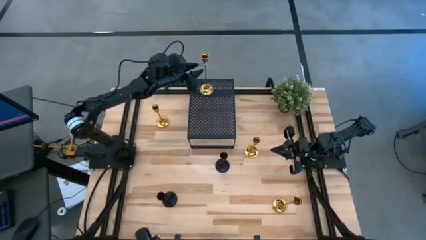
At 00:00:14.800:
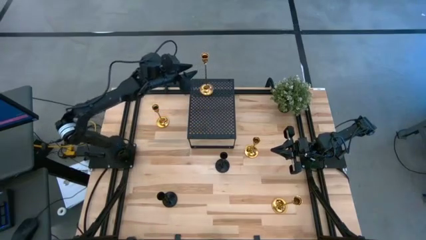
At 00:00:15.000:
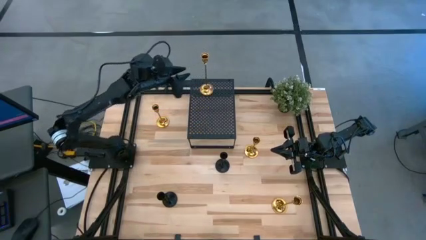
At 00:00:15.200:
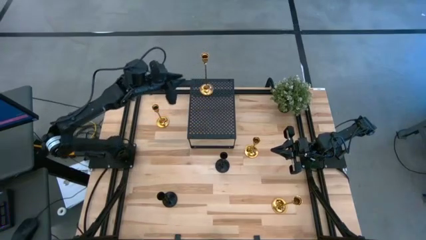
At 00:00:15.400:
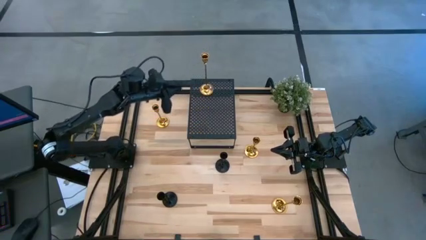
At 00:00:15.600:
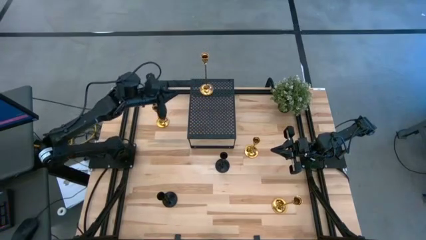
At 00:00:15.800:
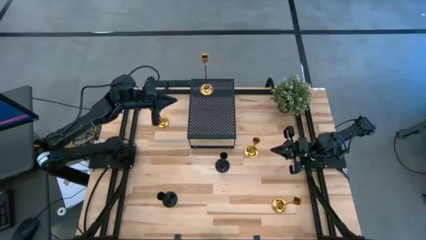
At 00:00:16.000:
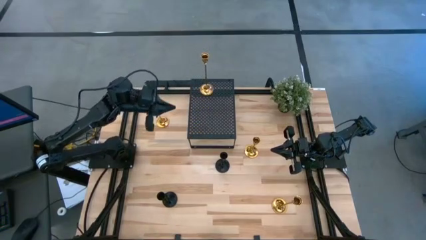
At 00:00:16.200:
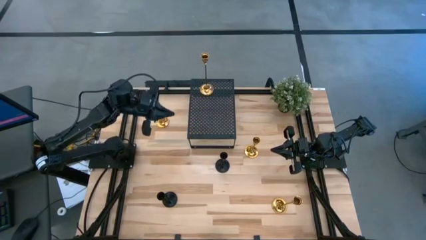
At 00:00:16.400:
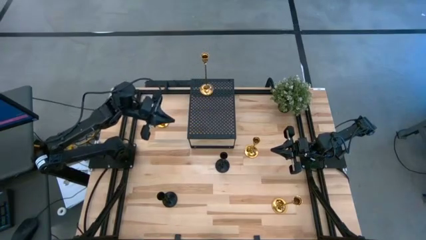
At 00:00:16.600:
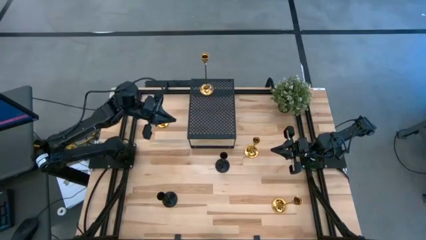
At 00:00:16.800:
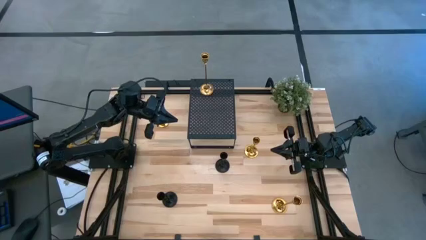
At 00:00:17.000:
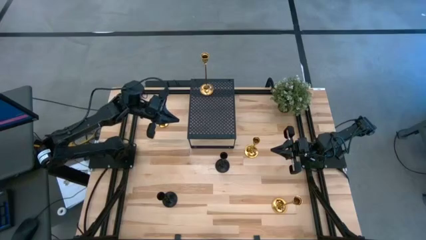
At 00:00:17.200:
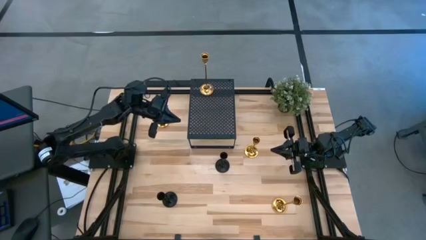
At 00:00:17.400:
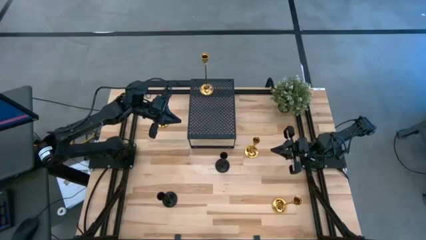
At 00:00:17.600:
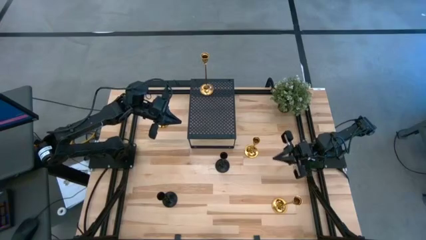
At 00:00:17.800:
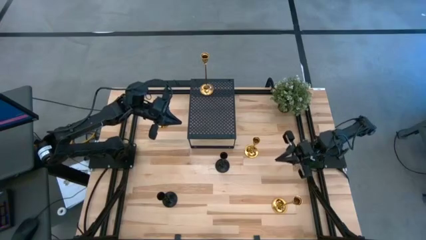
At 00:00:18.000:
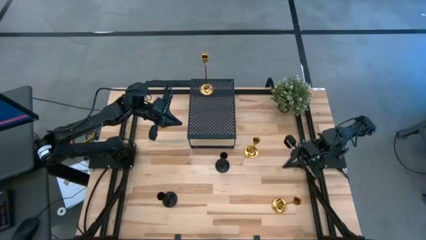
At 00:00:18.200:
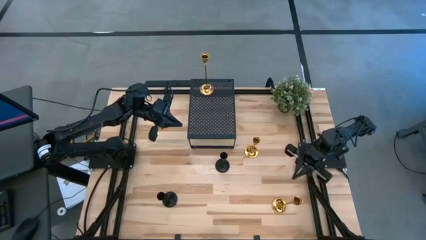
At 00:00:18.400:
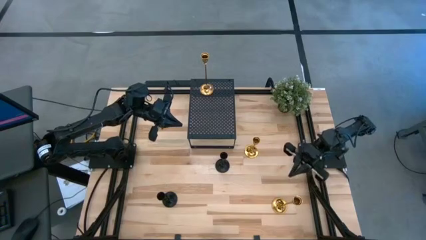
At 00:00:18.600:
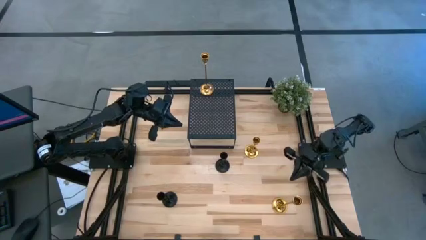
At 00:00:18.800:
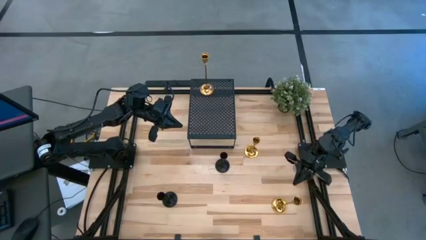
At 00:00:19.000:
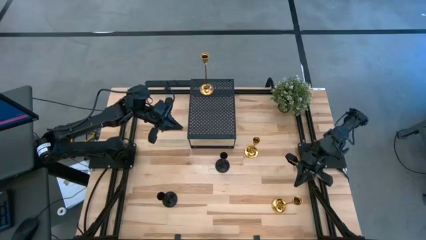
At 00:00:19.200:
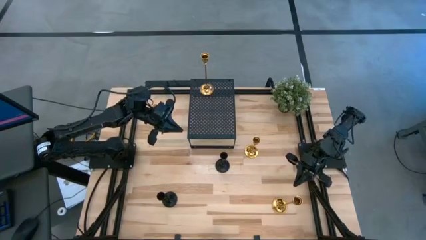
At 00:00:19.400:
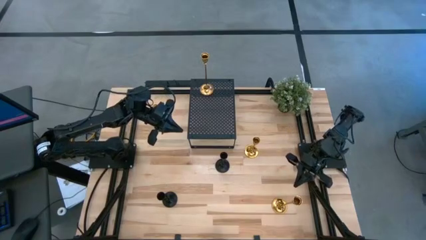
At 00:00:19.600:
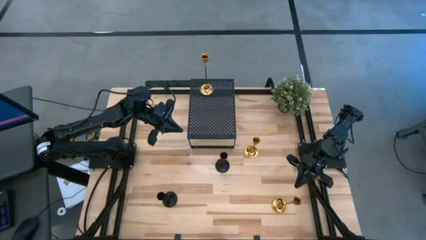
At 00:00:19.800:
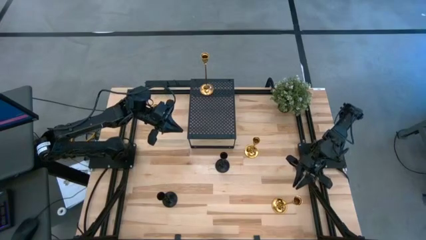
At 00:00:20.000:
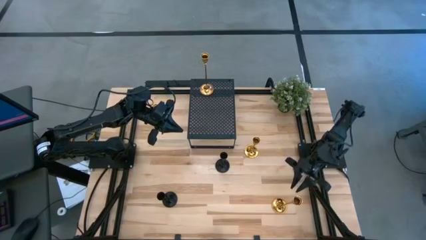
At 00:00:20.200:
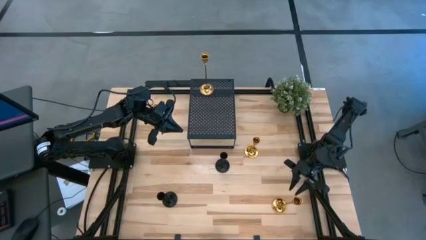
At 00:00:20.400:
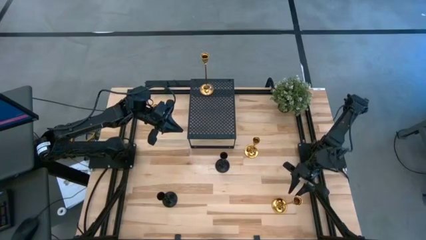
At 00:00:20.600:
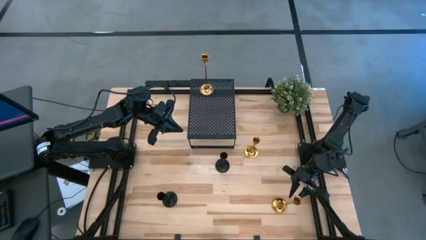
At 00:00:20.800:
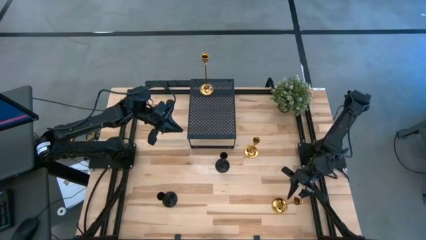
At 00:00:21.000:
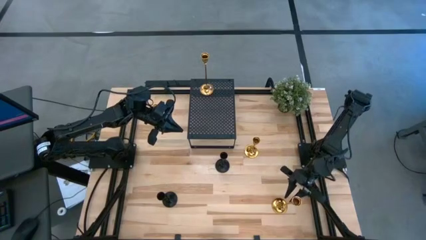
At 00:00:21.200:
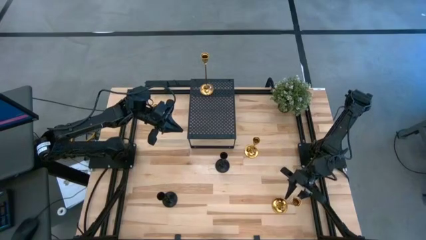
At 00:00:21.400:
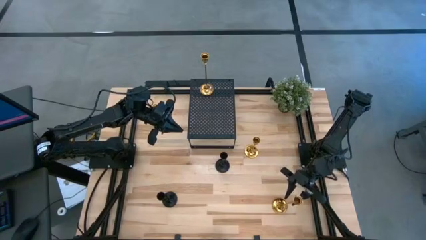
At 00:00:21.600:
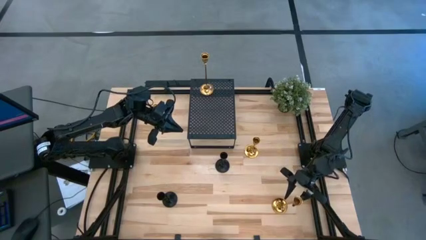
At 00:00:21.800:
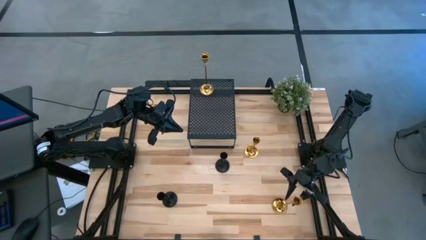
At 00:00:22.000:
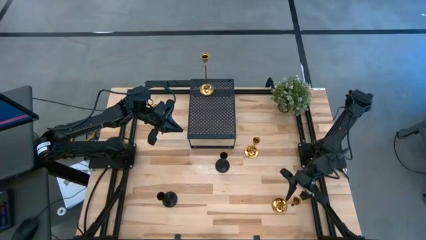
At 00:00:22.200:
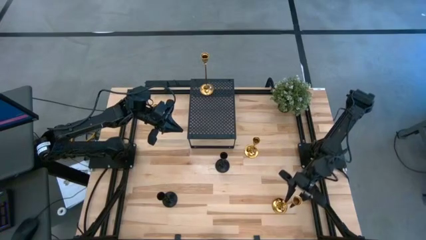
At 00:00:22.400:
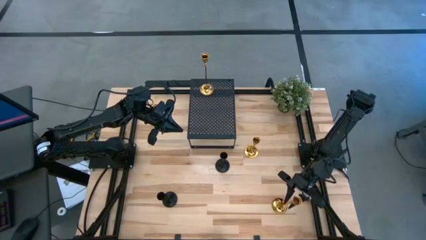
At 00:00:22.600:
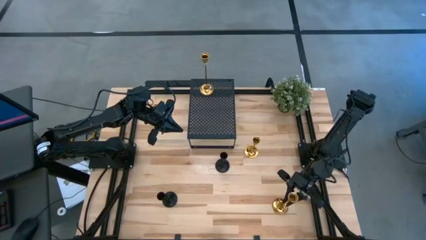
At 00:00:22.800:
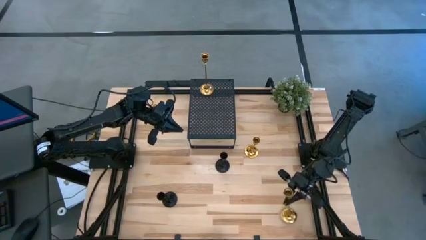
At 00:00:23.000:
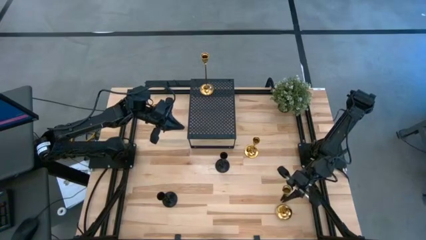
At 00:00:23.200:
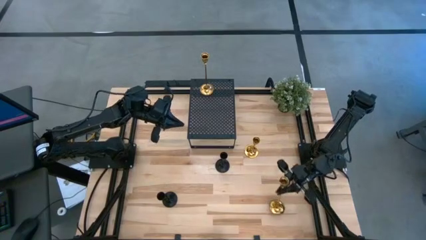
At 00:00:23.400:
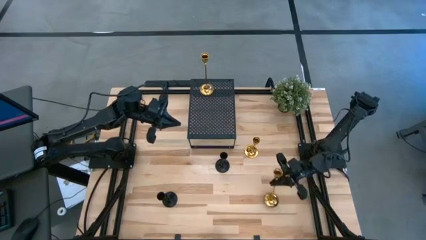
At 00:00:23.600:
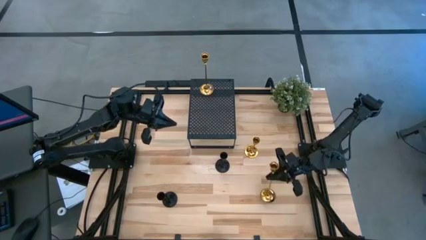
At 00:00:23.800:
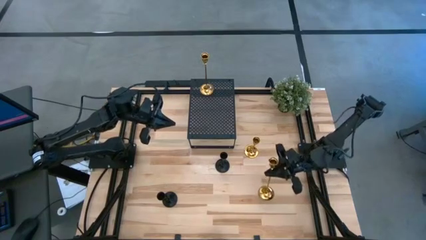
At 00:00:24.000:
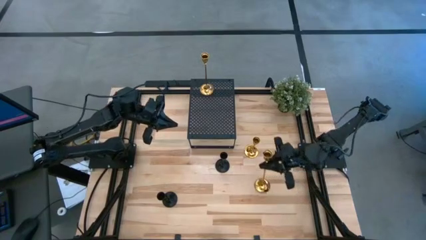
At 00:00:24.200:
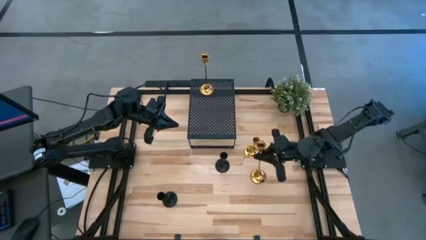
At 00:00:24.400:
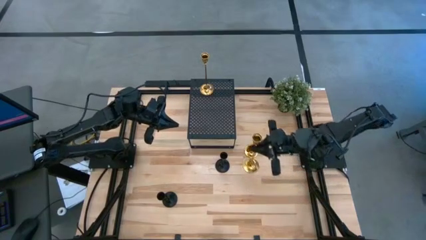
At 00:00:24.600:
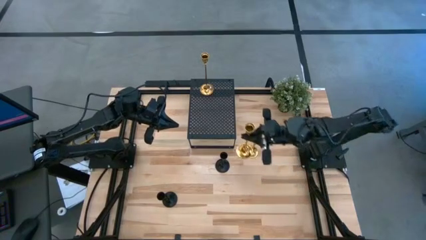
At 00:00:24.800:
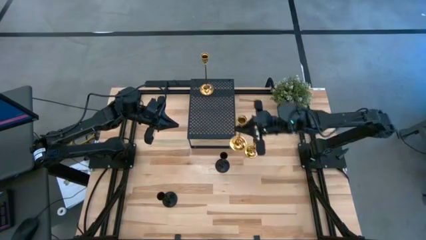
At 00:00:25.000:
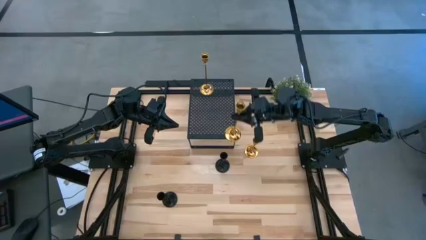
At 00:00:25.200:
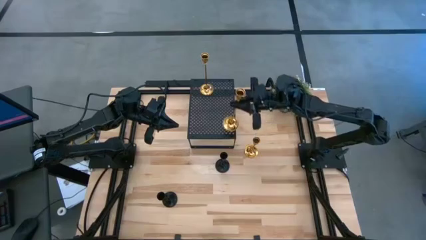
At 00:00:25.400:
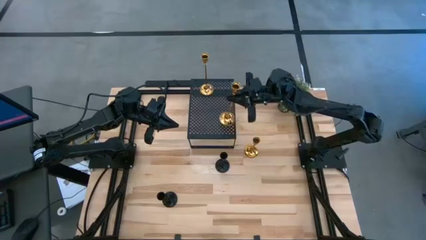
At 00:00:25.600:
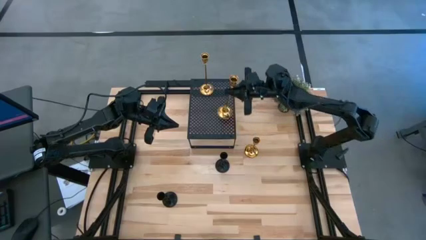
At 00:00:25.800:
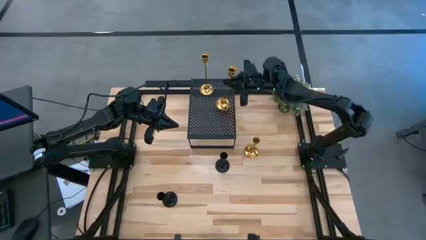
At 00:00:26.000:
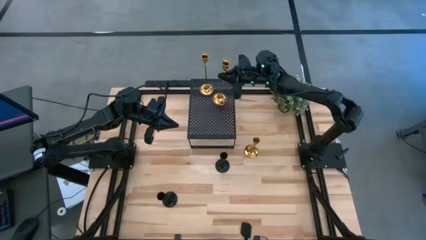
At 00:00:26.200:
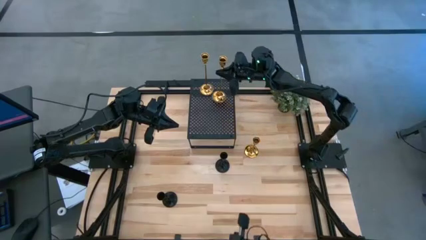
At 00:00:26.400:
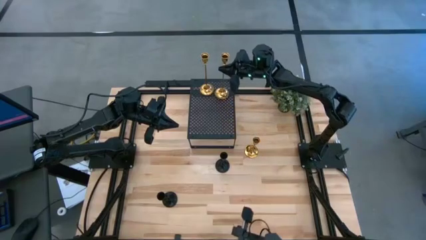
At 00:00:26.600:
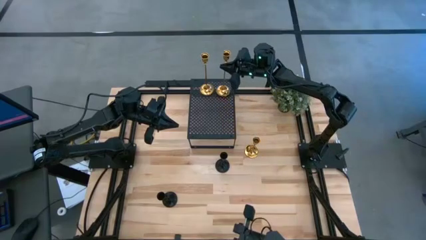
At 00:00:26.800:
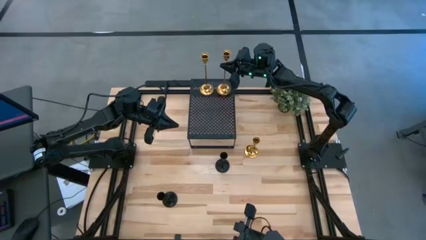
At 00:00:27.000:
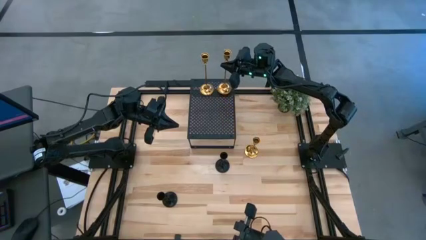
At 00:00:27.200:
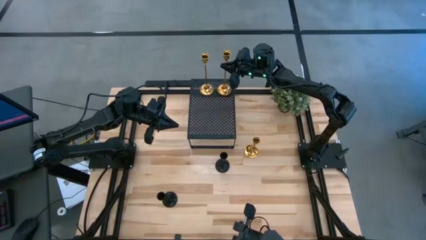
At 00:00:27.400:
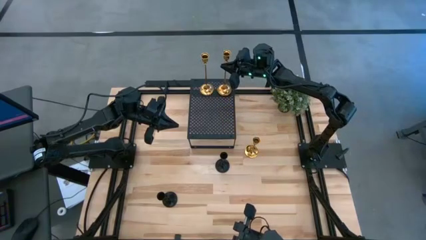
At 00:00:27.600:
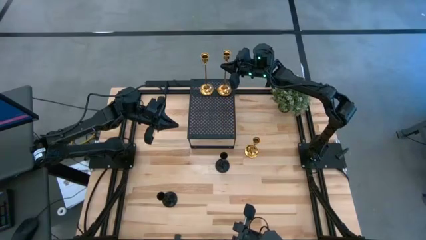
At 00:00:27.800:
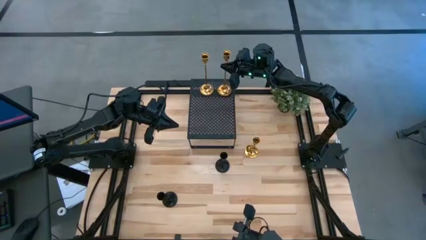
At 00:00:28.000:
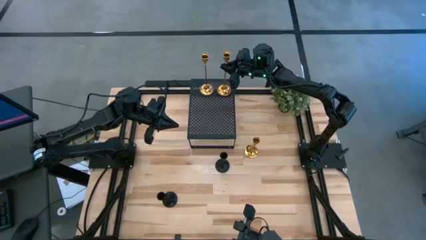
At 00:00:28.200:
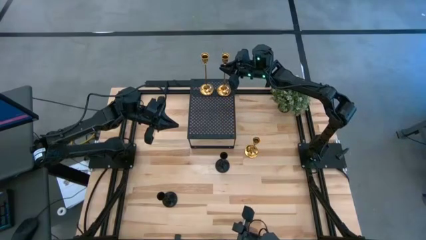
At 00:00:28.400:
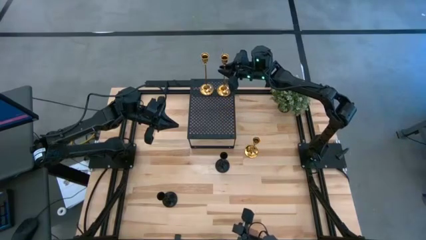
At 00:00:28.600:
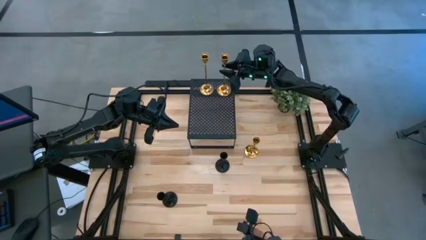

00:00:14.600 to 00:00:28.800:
Task: Pick & Place candle stick holders
Put the large gold candle holder on the shelf
